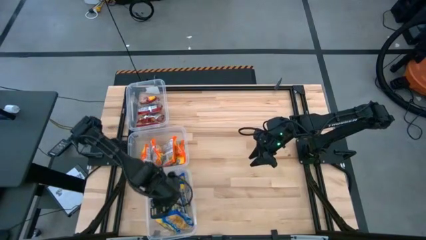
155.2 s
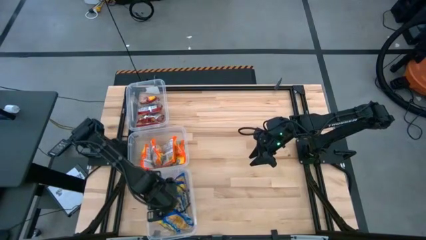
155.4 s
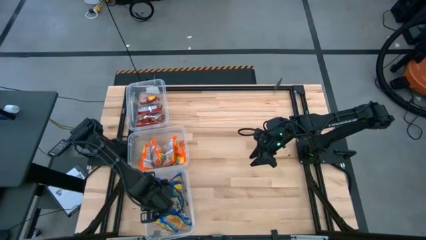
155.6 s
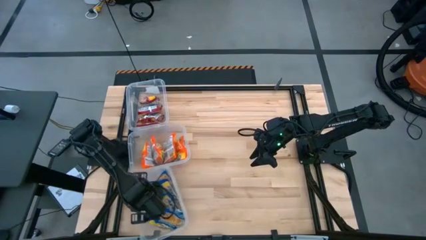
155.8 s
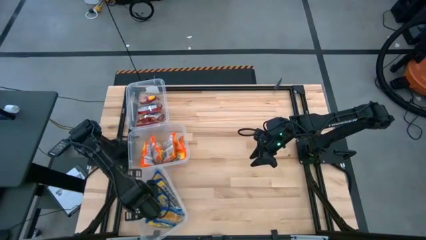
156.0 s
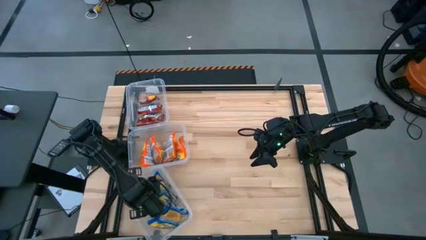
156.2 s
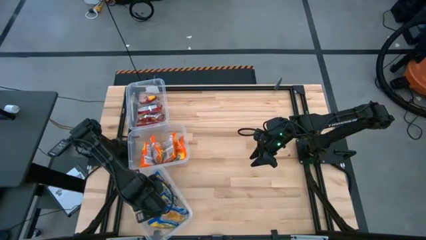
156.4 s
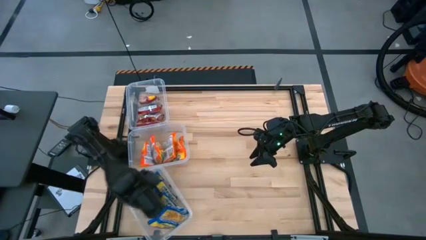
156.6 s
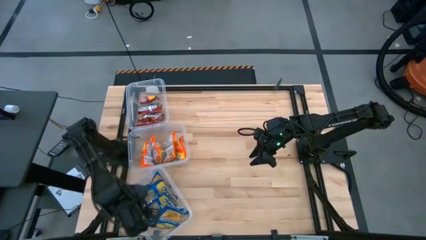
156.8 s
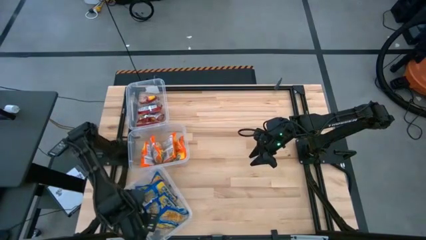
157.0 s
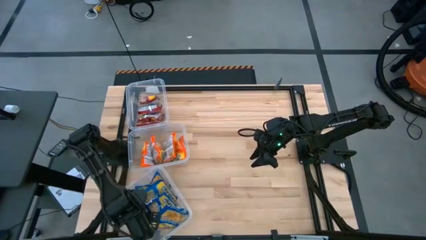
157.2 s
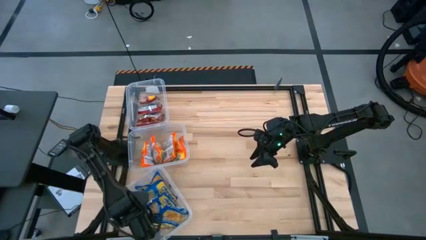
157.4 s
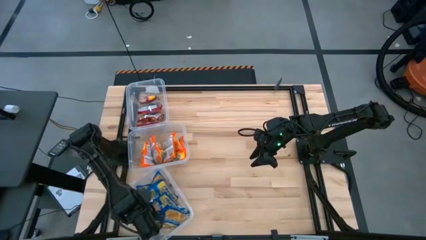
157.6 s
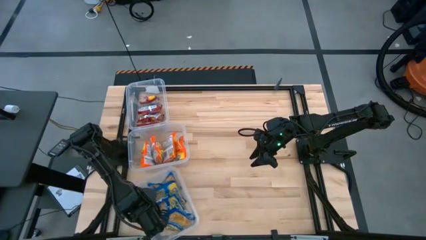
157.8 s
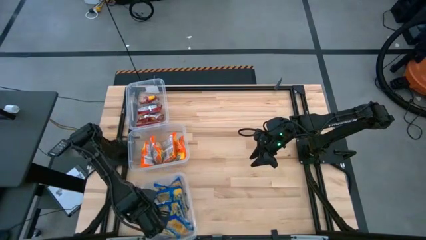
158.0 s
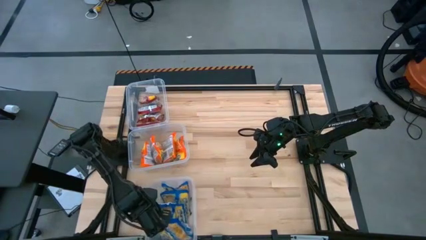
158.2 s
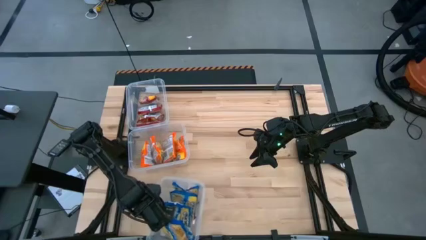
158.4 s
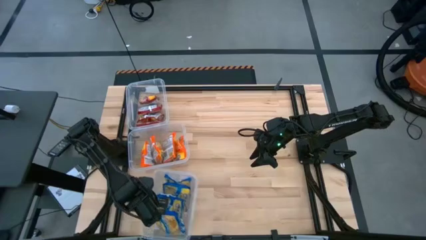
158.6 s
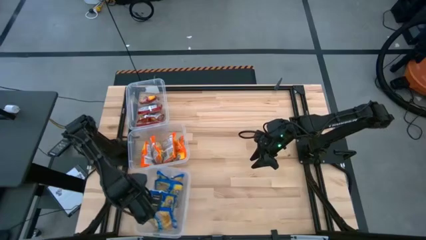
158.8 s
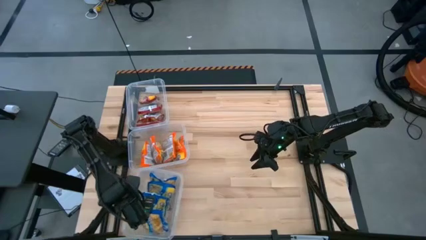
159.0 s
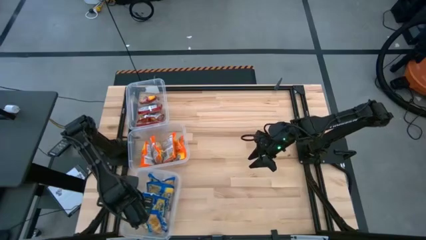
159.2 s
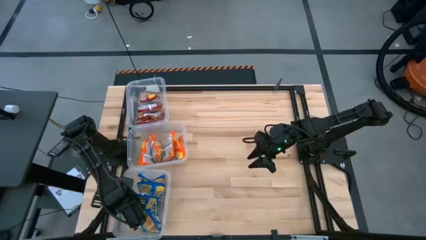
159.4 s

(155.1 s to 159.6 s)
Task: Sort Maruchan noodles
Adjust the bottom transparent bin

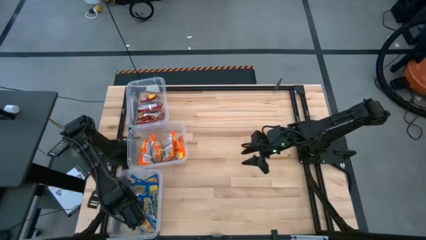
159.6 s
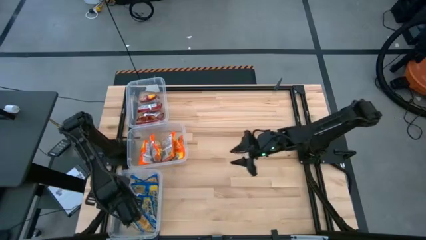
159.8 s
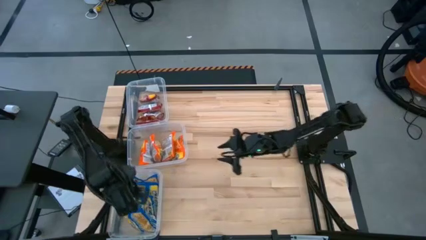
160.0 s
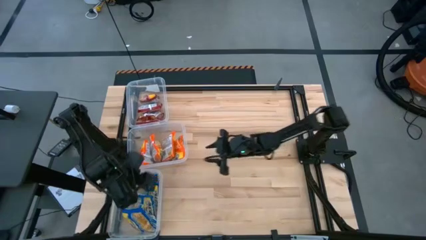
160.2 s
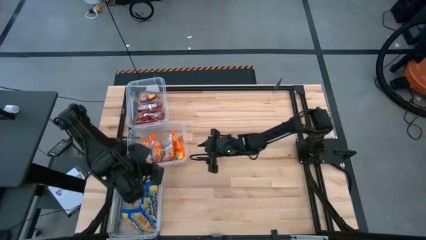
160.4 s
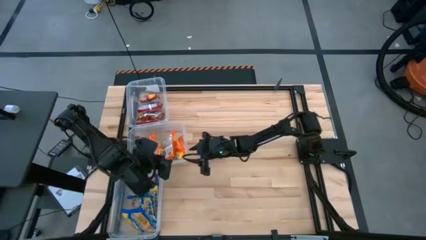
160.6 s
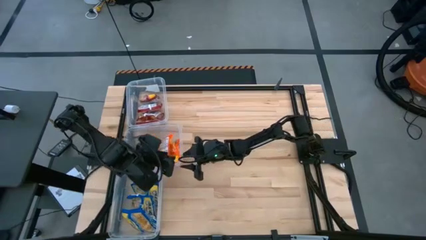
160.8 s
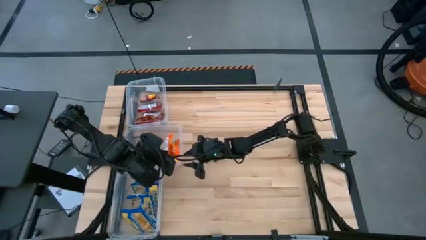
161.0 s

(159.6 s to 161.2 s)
Adjust the middle transparent bin

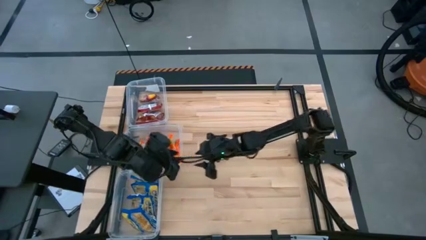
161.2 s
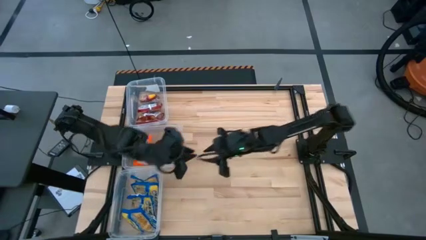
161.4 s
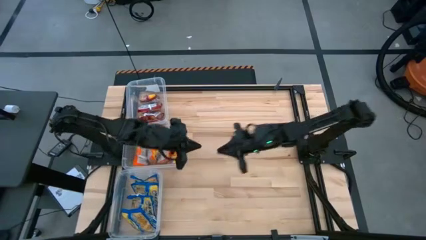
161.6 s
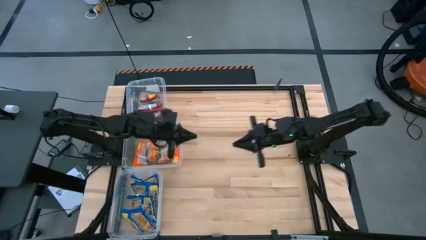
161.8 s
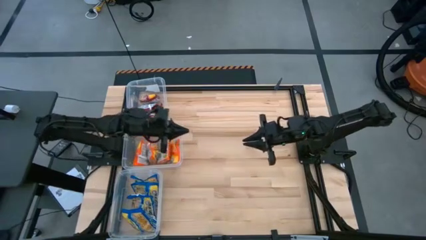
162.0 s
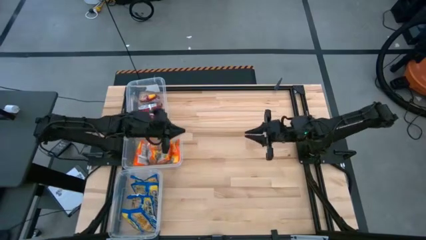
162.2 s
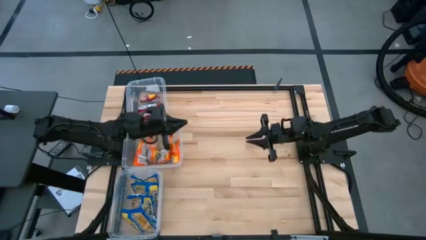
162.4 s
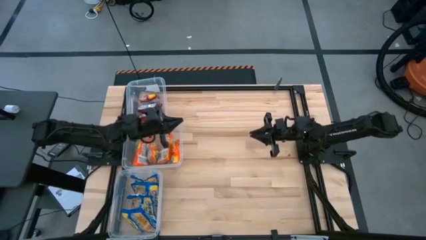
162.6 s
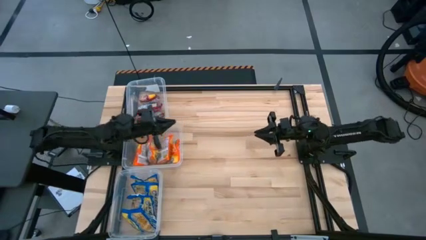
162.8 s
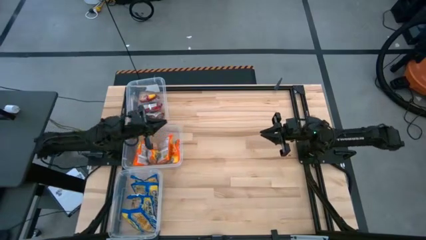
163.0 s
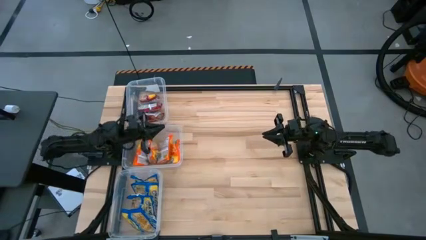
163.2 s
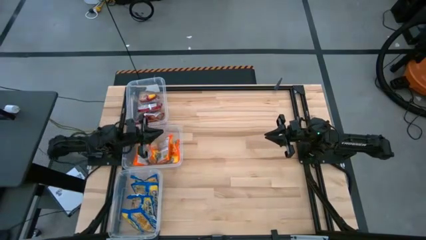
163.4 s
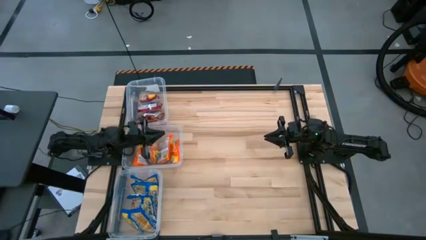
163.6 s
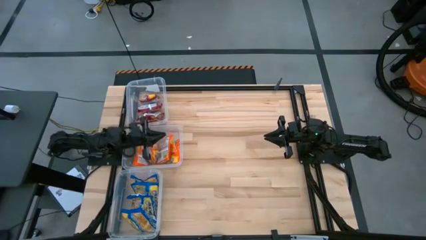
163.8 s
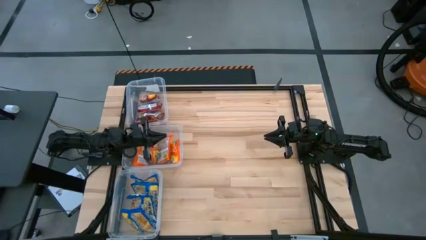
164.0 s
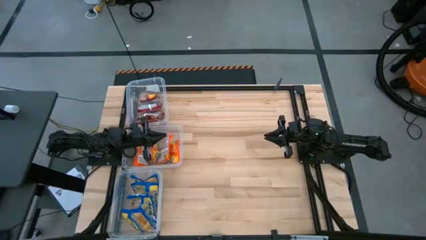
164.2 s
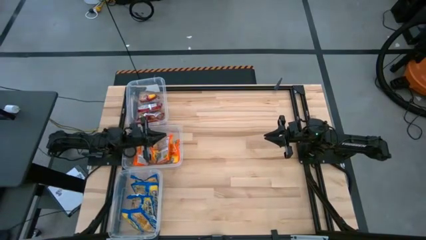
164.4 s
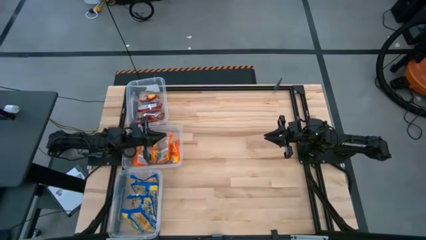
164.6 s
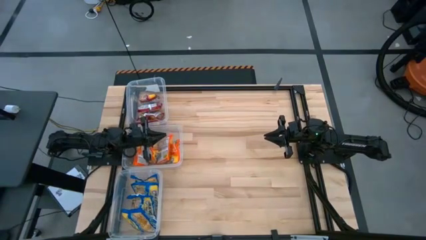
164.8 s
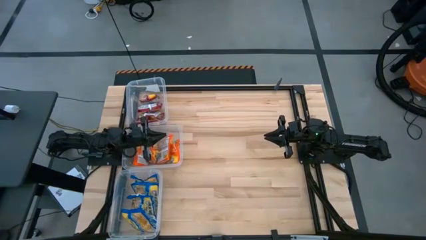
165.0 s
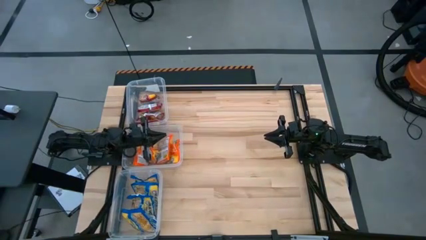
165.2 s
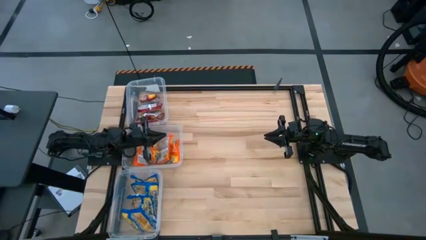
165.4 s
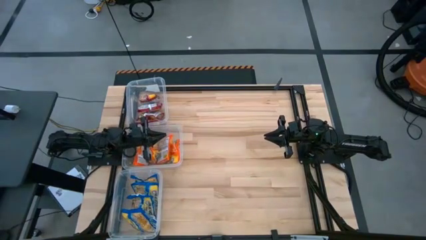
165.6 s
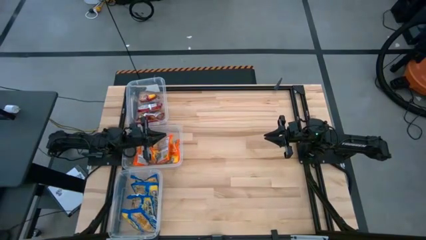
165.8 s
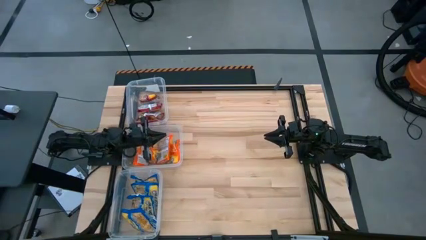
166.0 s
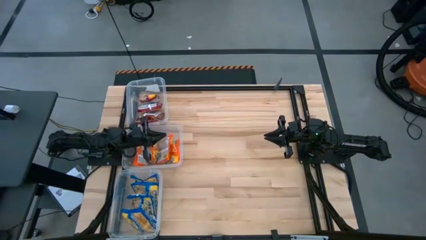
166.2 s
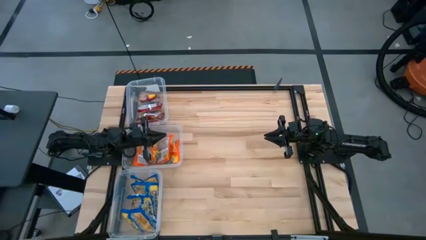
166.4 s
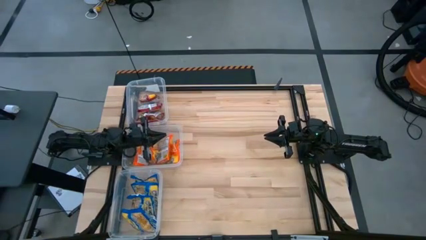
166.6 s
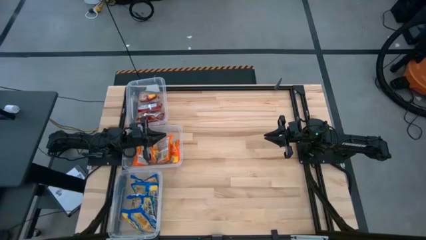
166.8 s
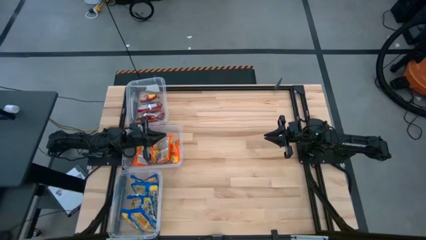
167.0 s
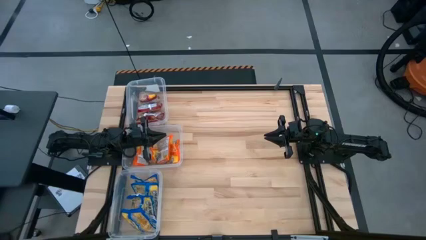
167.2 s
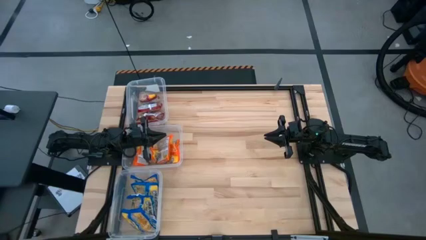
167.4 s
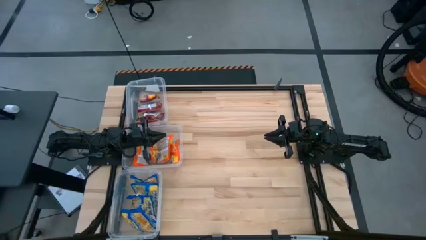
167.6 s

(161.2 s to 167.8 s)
Return to Home Position

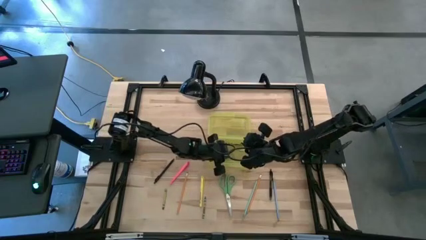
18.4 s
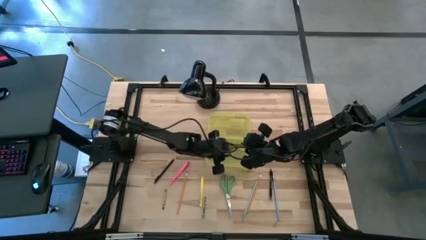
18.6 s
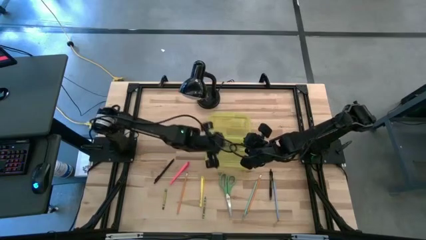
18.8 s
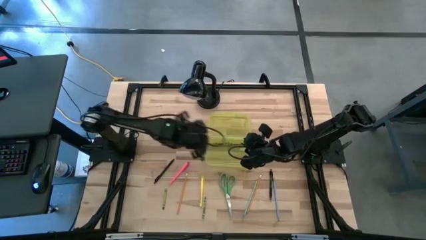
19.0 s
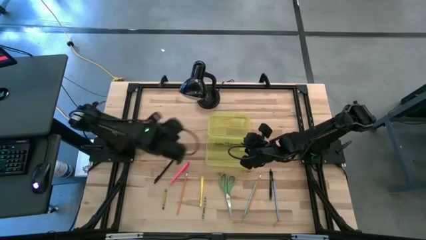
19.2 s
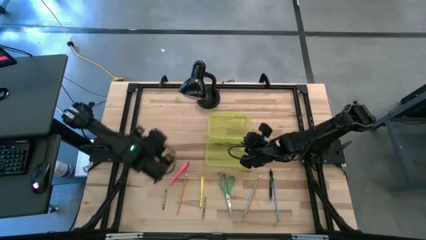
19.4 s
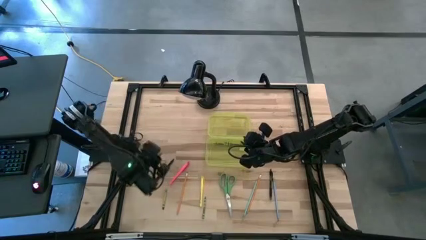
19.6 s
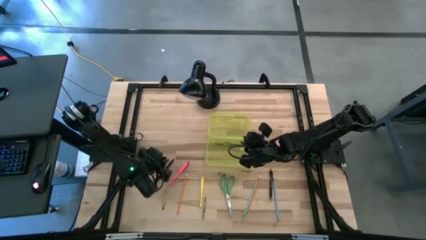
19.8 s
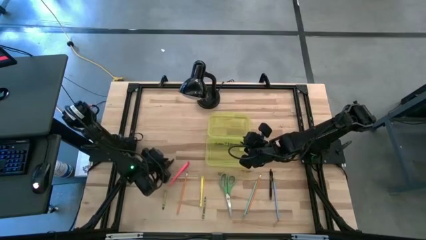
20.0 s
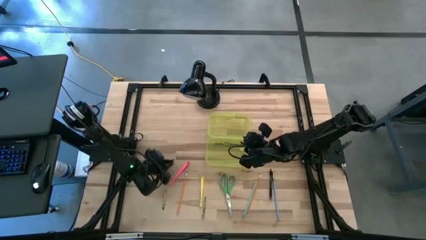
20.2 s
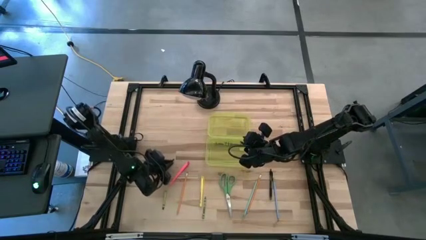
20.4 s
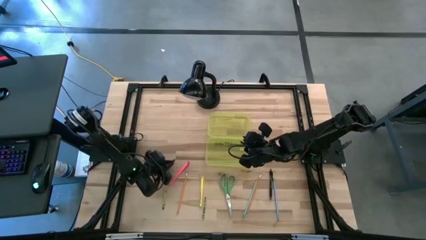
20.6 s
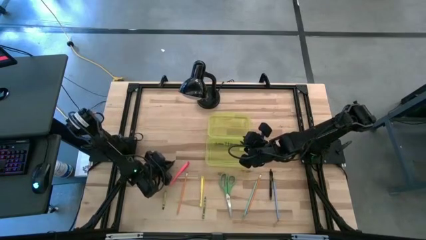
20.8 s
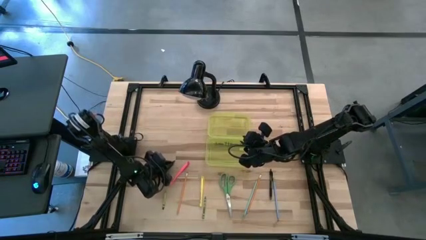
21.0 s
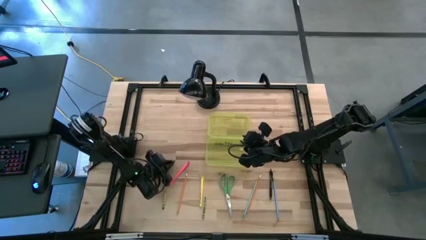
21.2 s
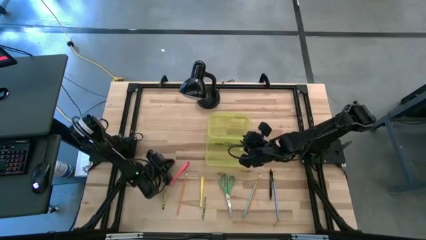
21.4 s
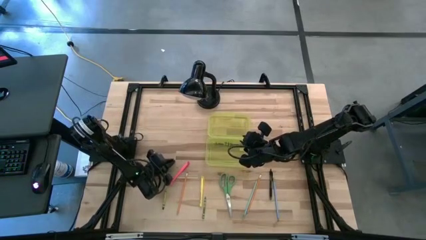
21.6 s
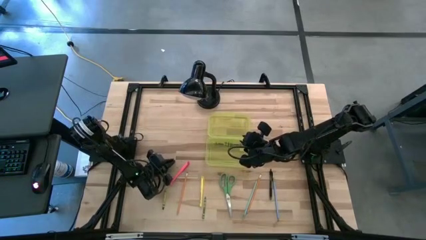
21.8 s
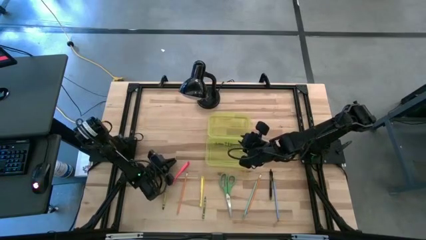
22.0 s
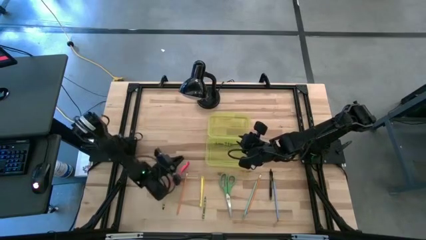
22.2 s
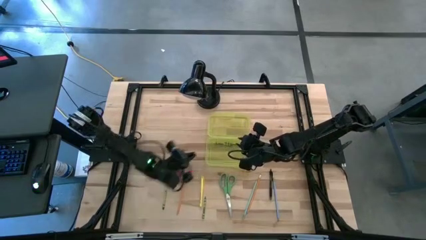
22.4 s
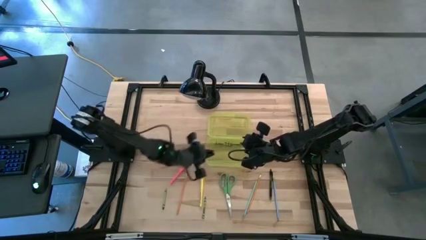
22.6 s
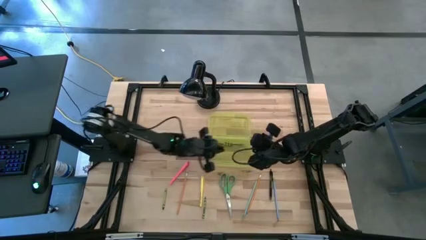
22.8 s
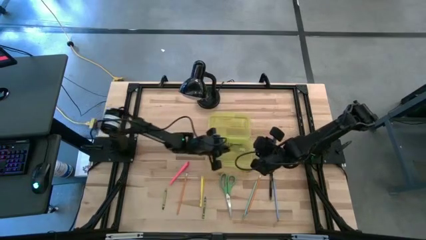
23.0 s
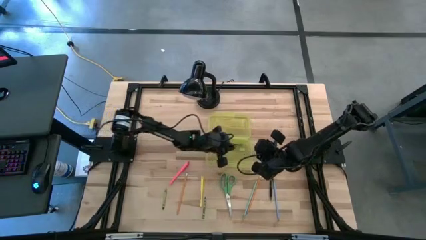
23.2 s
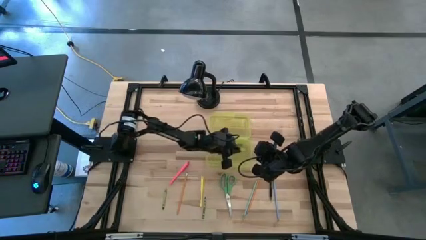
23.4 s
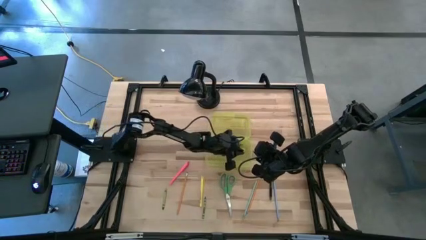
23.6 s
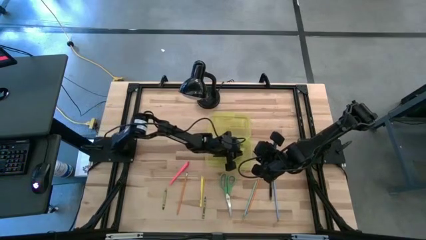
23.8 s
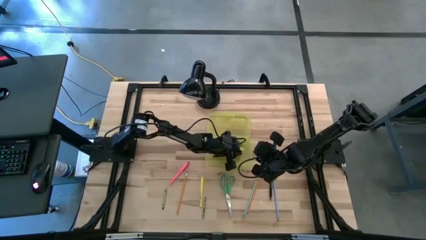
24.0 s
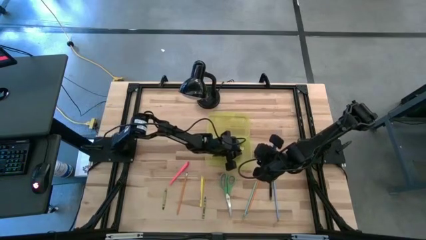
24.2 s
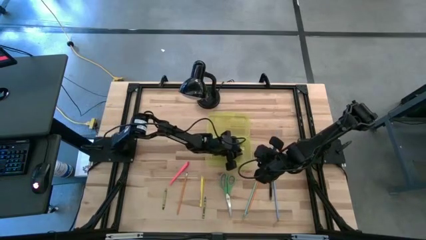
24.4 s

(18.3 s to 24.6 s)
Task: Pick & place school supplies into a supply box
Put the black pen into the yellow supply box
